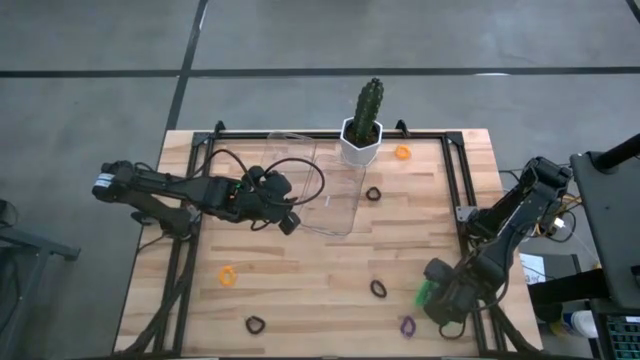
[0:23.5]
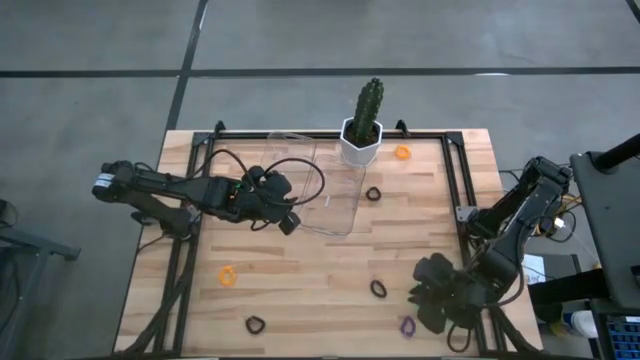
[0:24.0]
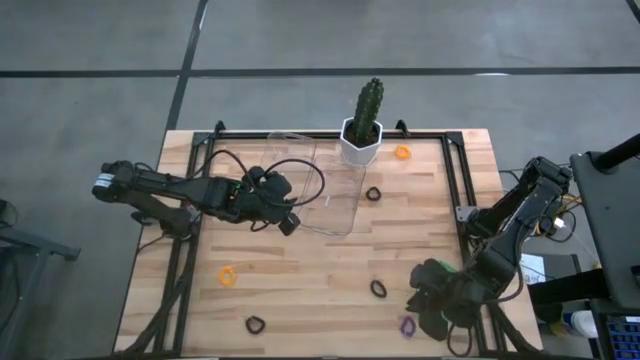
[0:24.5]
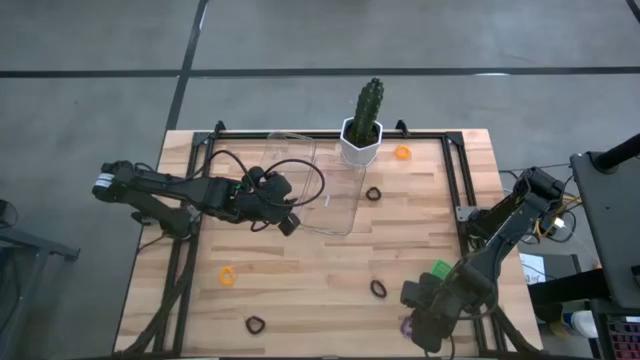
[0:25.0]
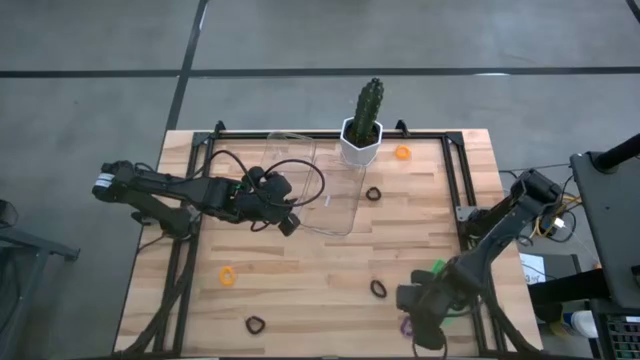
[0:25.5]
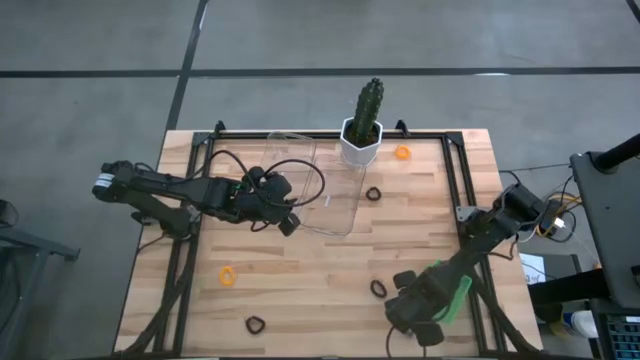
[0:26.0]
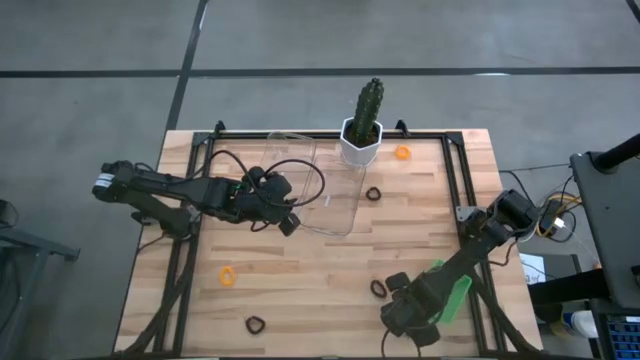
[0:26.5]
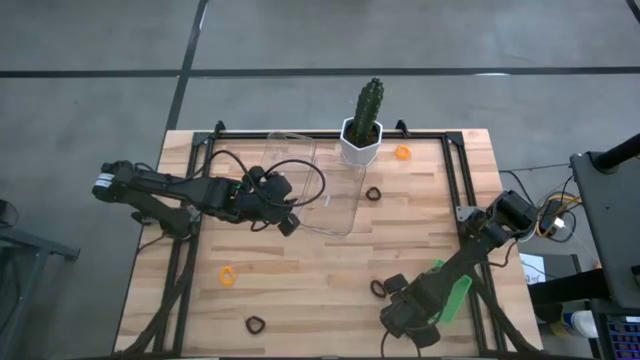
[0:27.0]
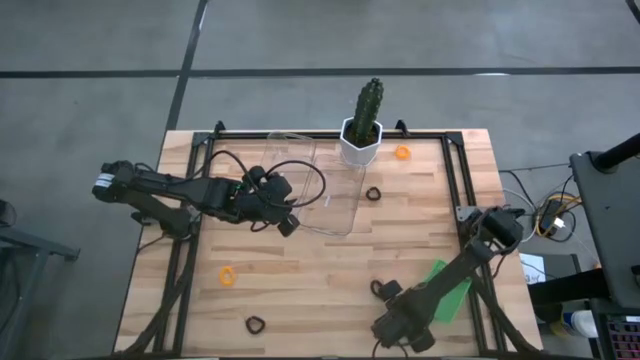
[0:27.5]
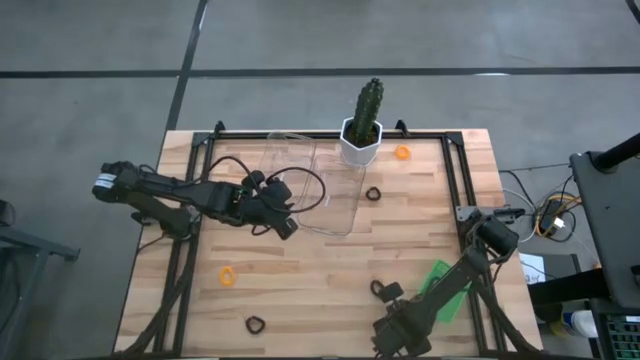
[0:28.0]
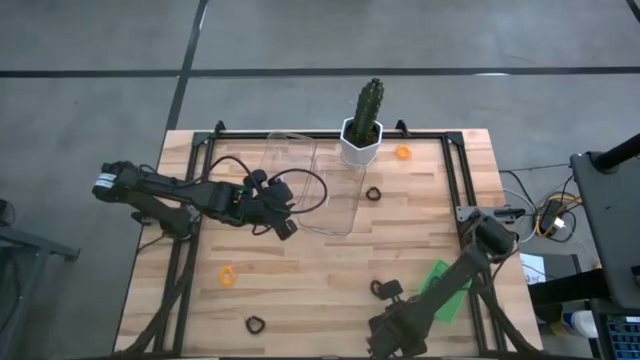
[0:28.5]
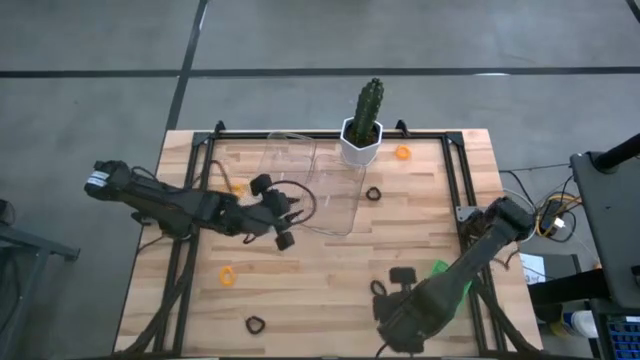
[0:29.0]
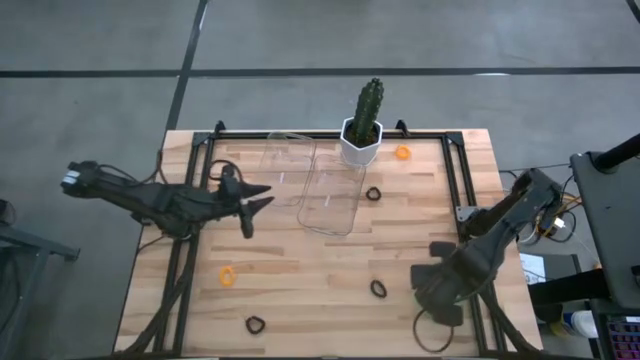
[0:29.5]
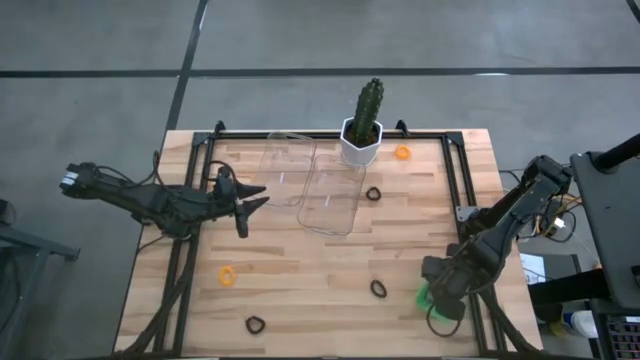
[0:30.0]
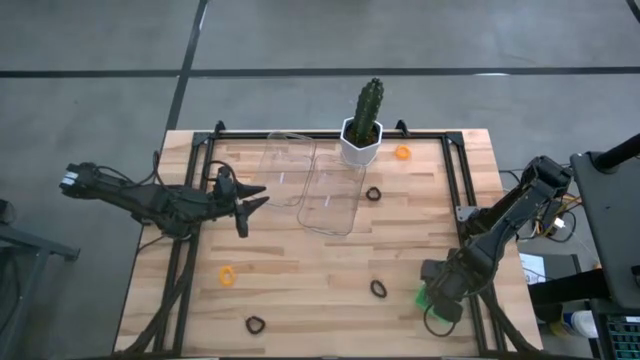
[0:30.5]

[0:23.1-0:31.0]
Task: Sort items
Put the purple keychain into the green bin

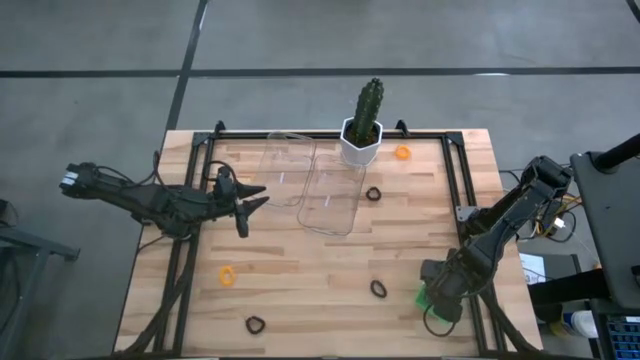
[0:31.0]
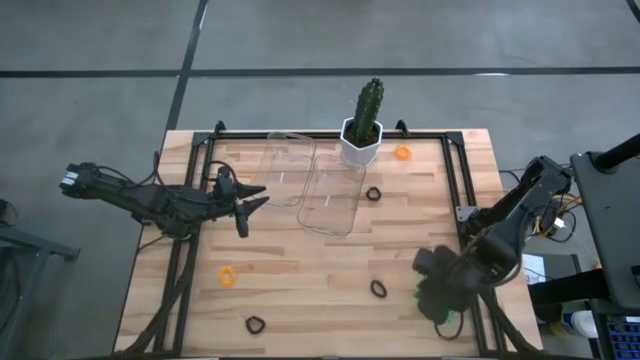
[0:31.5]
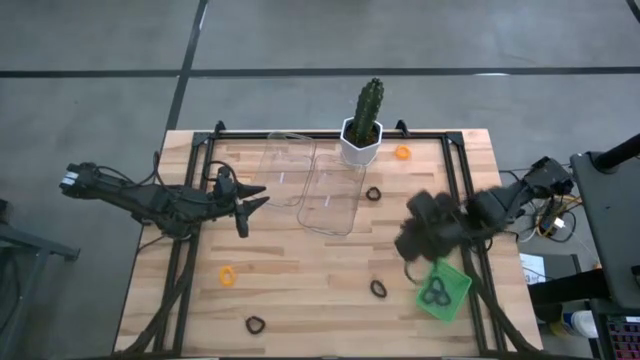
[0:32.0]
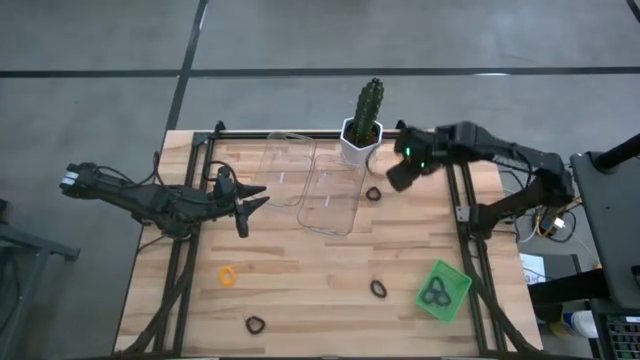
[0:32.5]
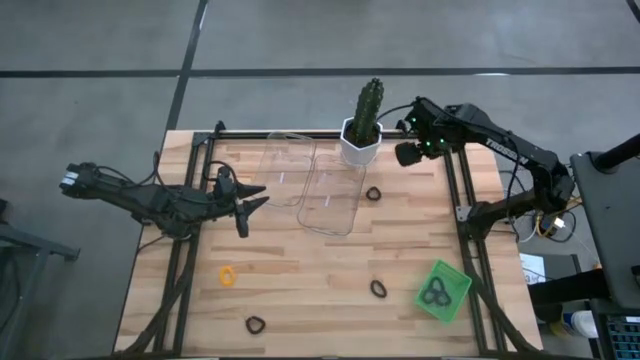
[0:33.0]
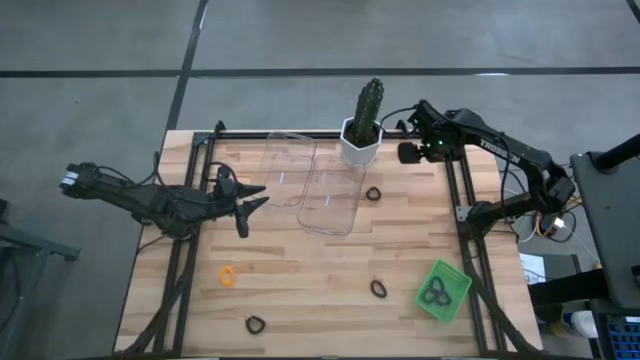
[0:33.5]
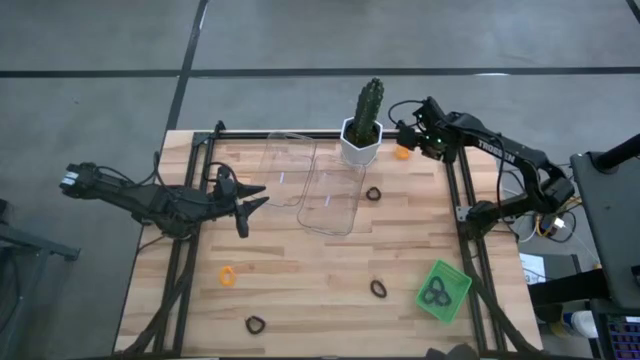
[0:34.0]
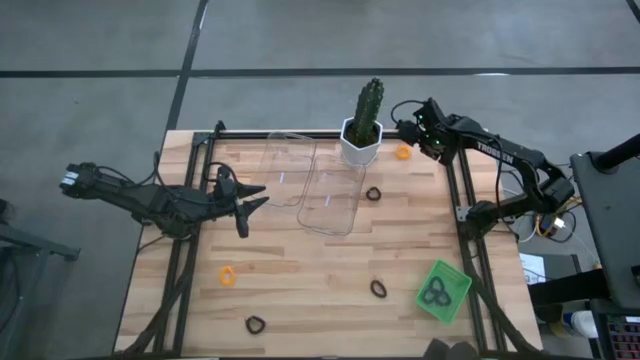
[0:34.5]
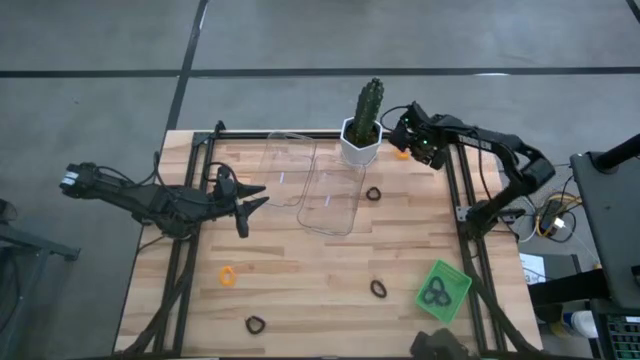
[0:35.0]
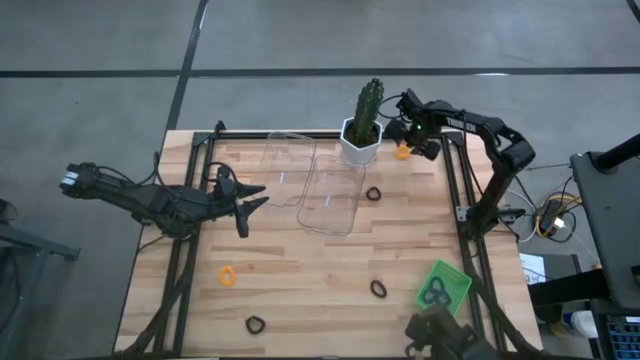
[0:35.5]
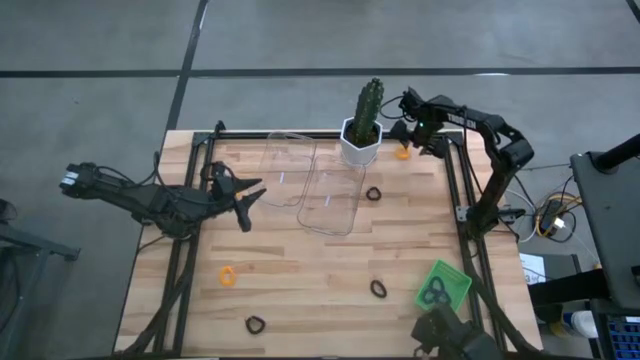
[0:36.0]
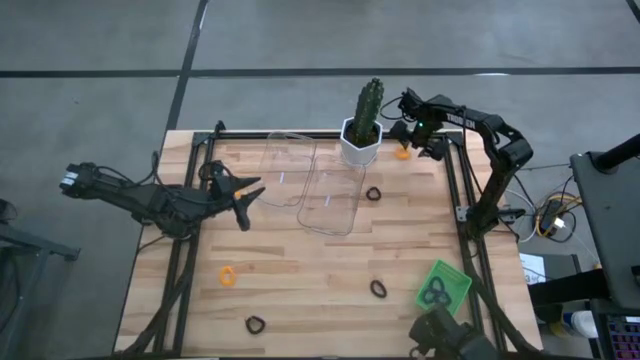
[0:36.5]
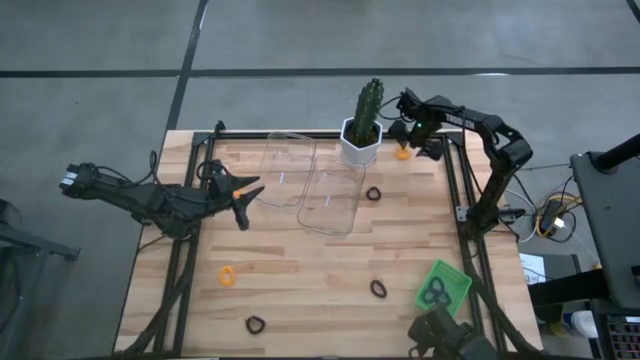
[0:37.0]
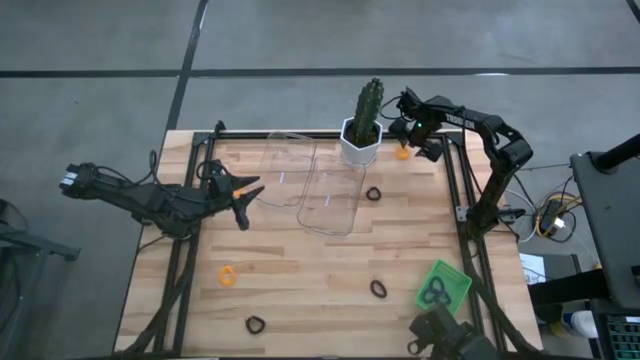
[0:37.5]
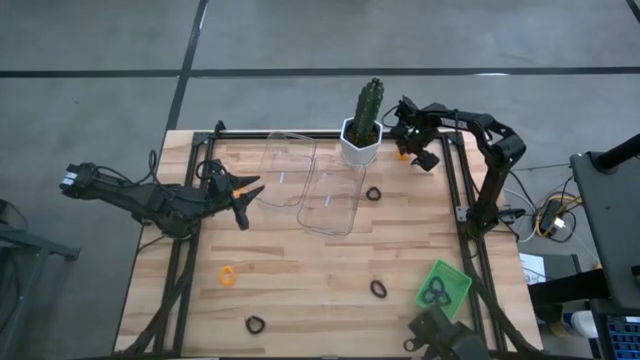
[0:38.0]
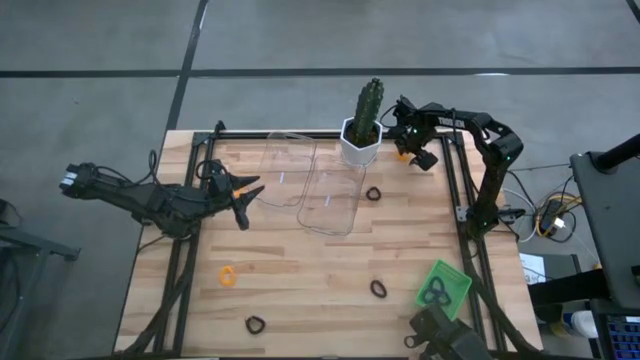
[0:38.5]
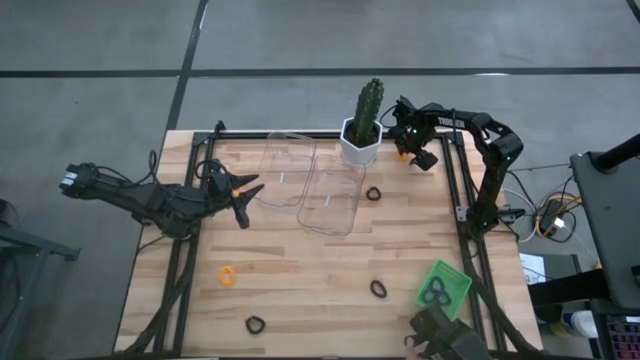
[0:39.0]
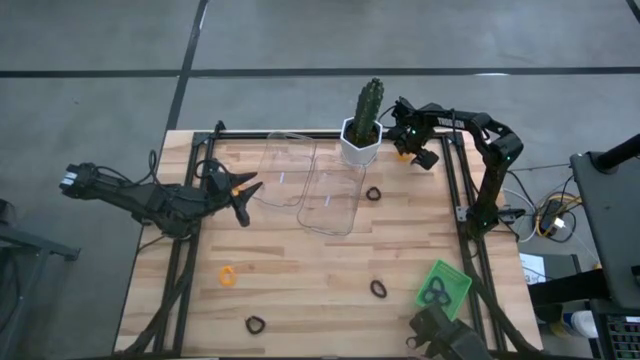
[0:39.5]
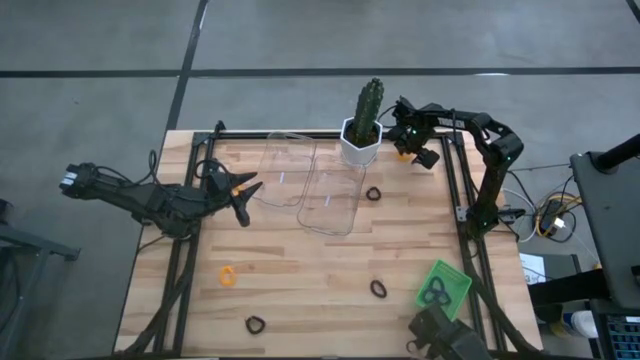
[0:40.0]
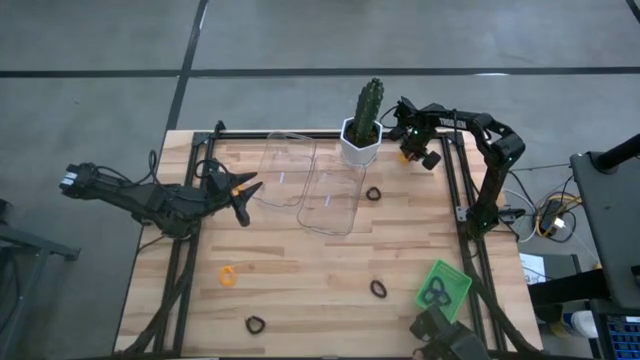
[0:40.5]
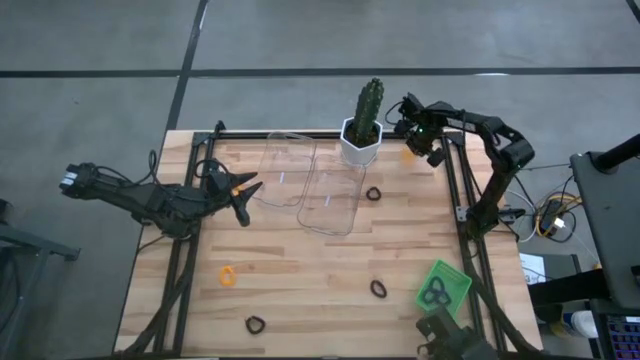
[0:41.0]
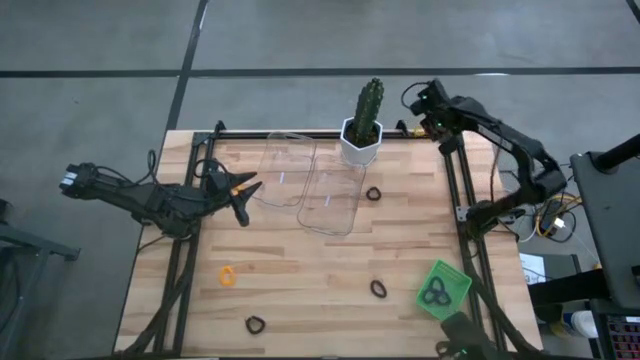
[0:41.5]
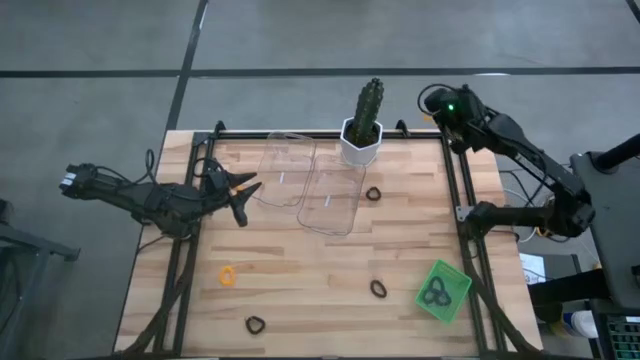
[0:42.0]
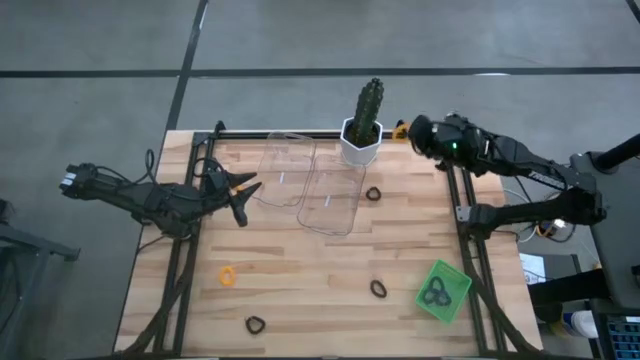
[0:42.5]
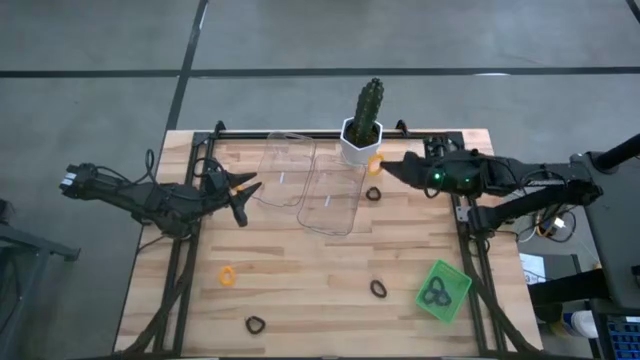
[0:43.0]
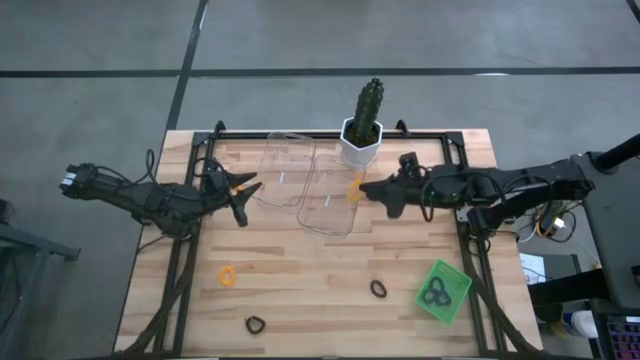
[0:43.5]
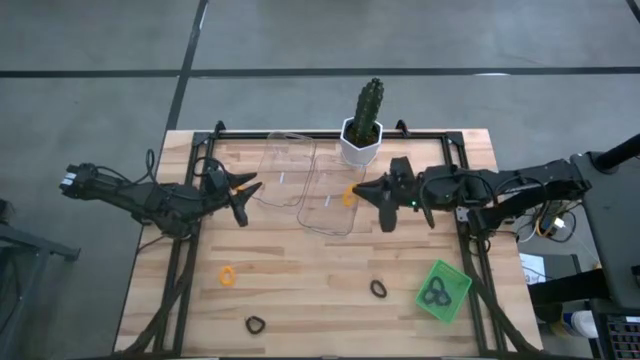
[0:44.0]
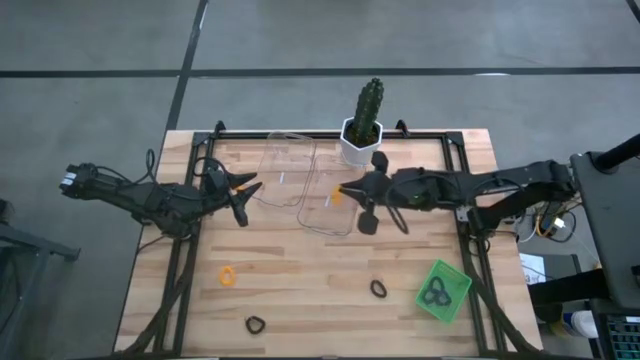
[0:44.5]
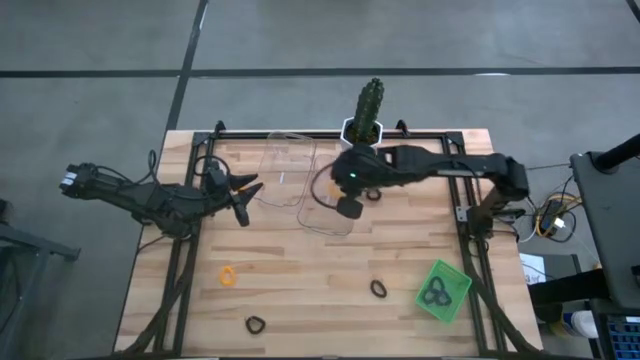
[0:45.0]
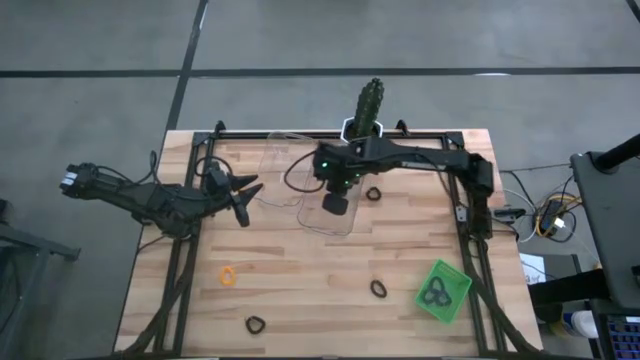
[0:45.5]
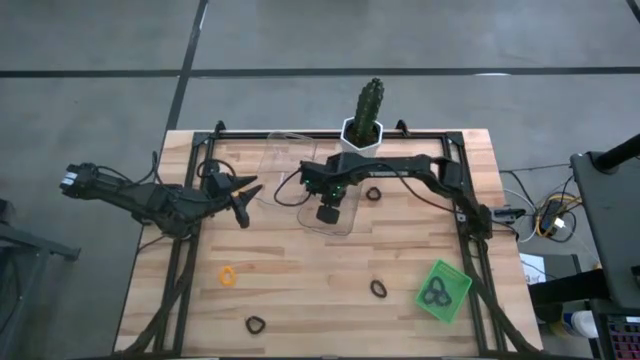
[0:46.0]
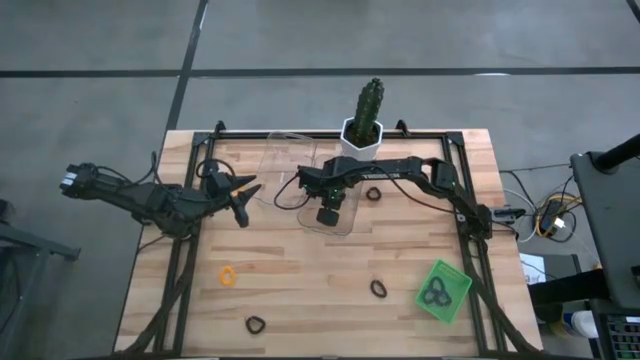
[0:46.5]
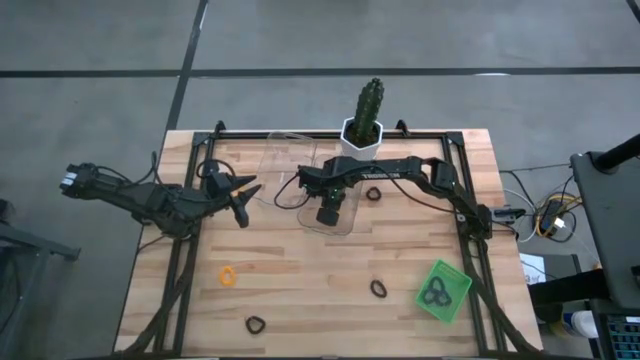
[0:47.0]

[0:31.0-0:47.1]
Put the top right yellow keychain into the right transparent bin
